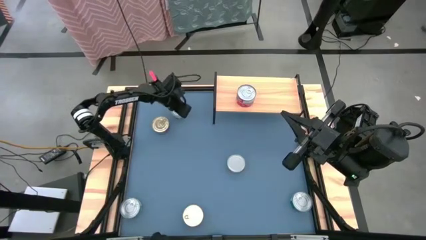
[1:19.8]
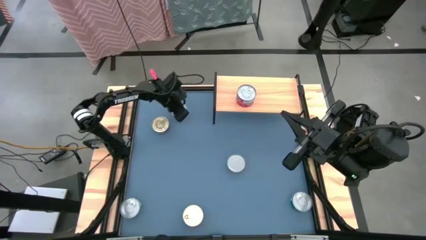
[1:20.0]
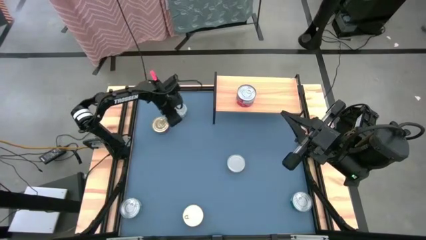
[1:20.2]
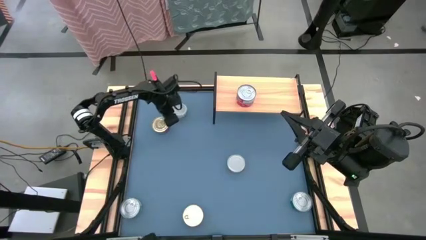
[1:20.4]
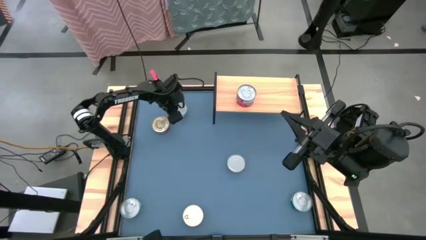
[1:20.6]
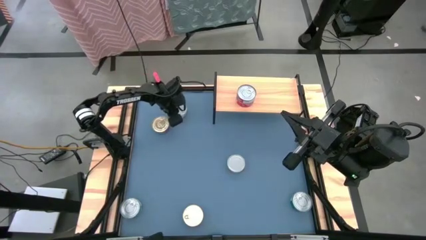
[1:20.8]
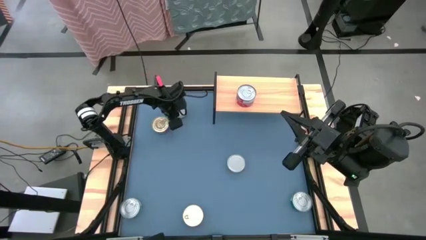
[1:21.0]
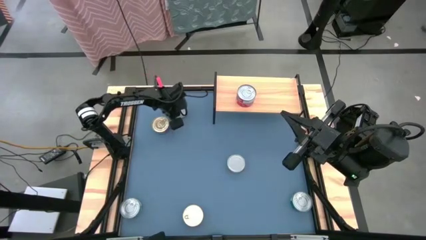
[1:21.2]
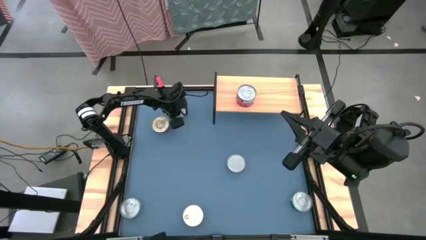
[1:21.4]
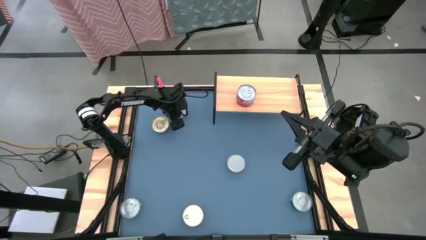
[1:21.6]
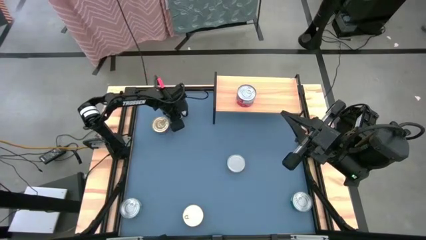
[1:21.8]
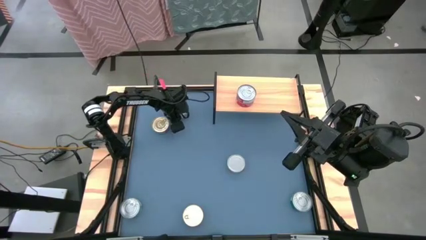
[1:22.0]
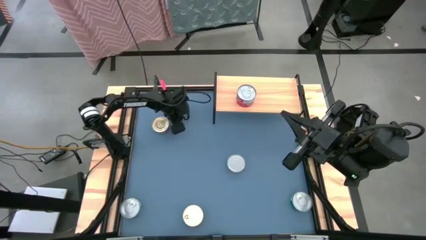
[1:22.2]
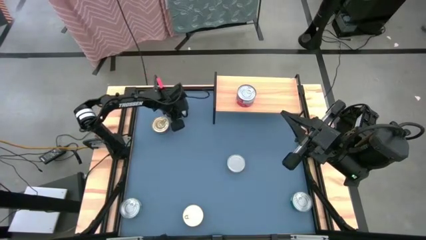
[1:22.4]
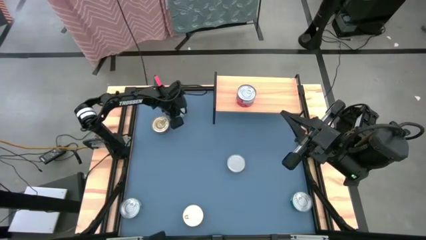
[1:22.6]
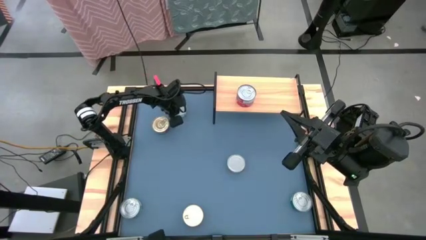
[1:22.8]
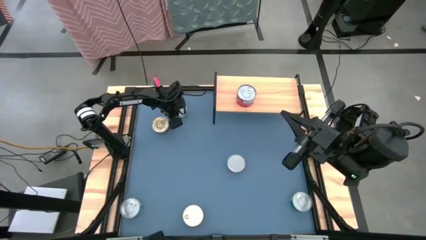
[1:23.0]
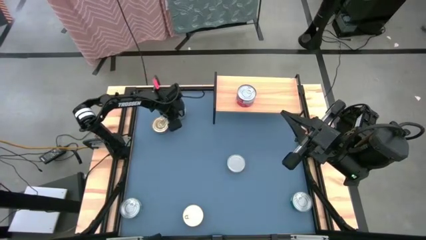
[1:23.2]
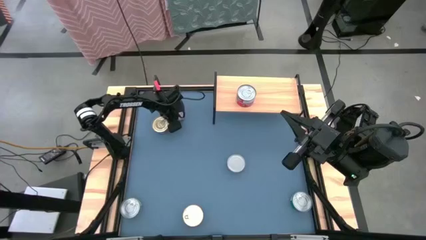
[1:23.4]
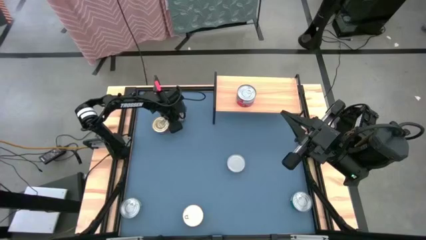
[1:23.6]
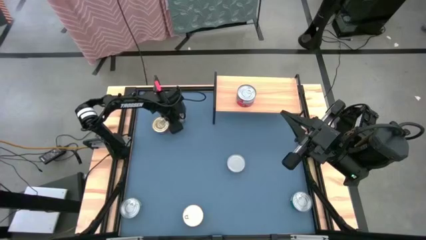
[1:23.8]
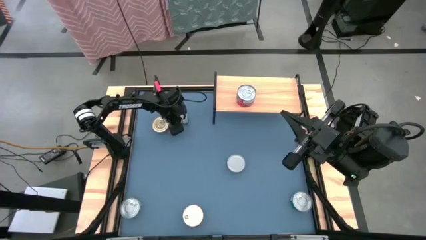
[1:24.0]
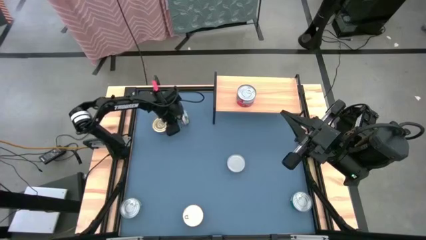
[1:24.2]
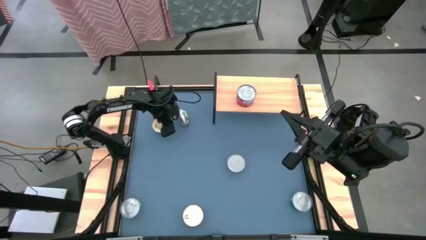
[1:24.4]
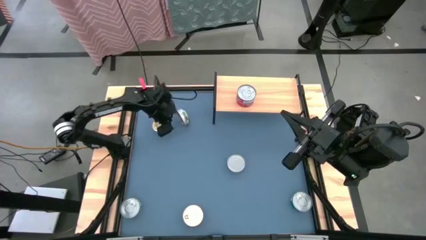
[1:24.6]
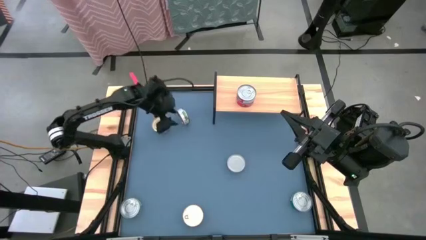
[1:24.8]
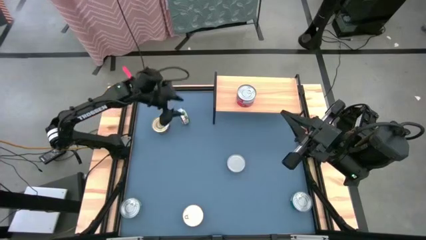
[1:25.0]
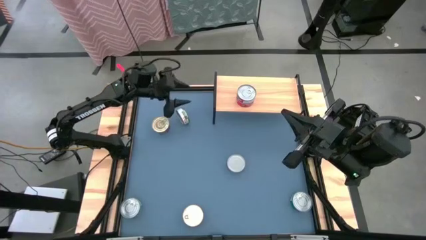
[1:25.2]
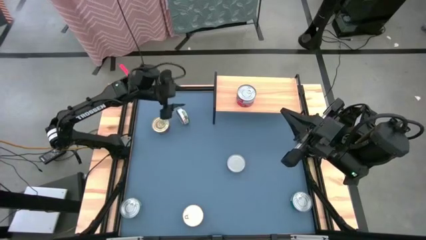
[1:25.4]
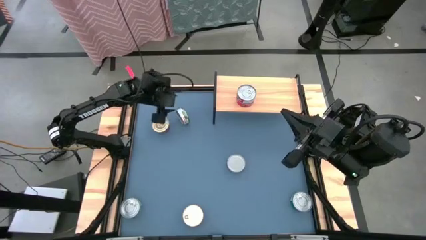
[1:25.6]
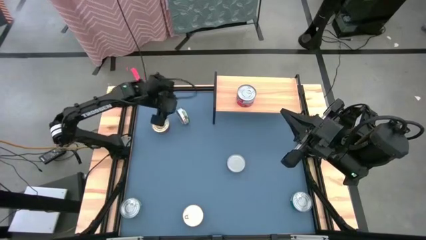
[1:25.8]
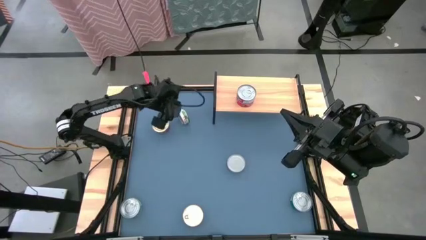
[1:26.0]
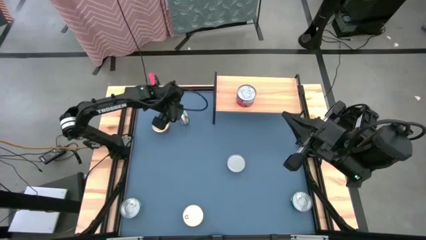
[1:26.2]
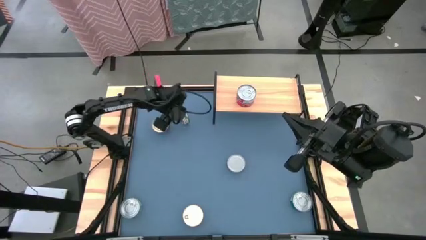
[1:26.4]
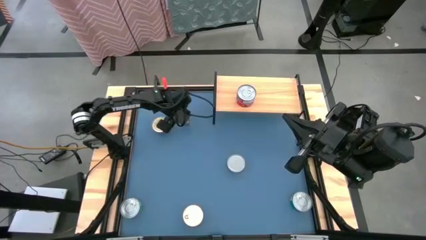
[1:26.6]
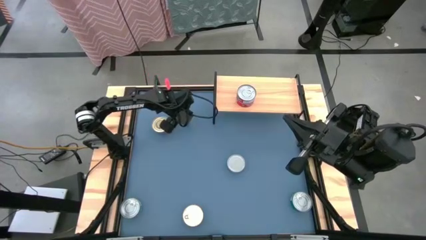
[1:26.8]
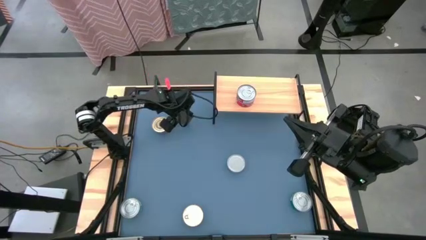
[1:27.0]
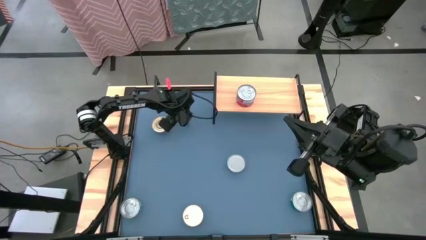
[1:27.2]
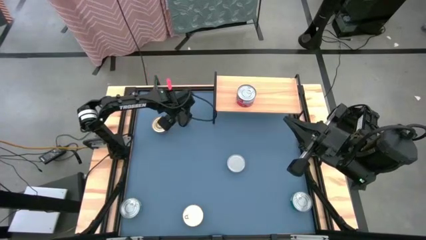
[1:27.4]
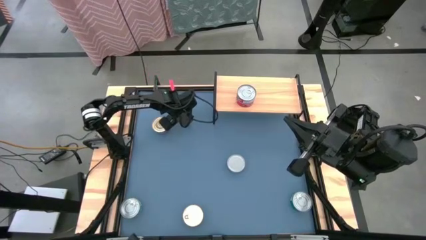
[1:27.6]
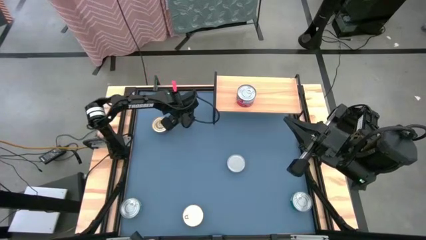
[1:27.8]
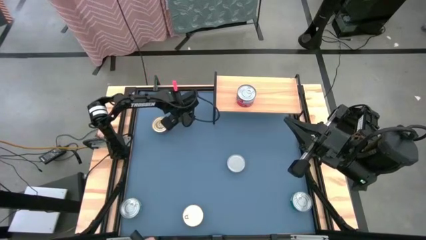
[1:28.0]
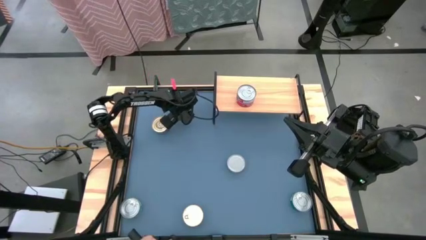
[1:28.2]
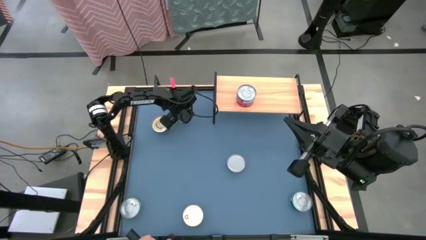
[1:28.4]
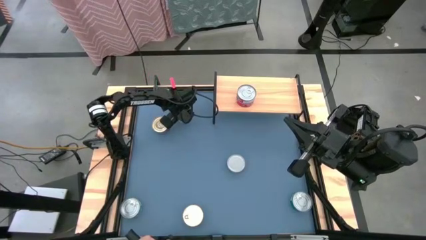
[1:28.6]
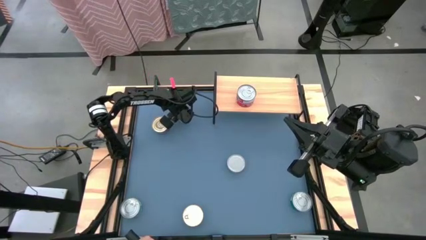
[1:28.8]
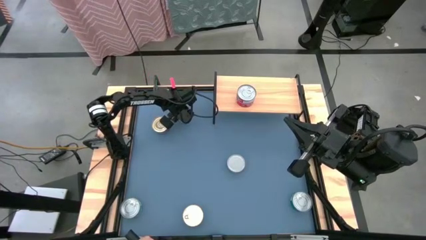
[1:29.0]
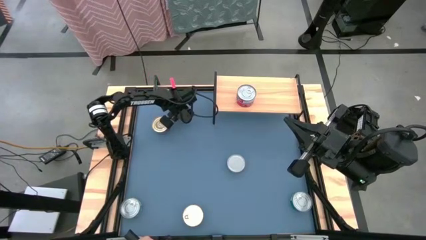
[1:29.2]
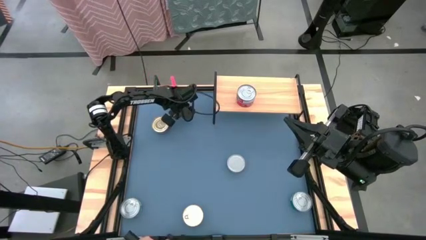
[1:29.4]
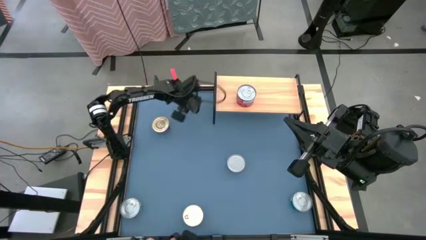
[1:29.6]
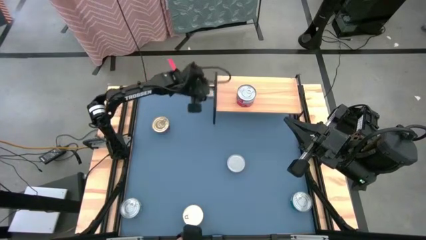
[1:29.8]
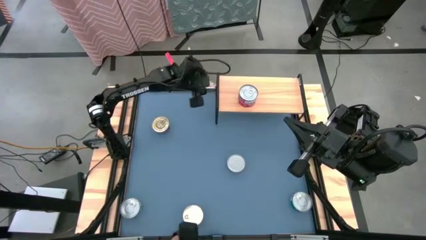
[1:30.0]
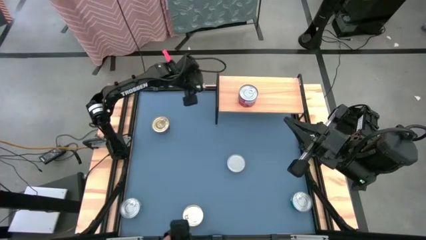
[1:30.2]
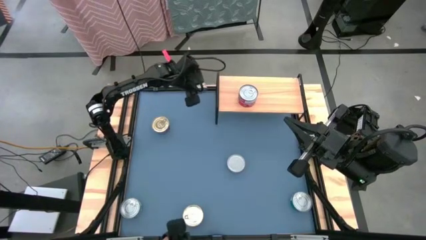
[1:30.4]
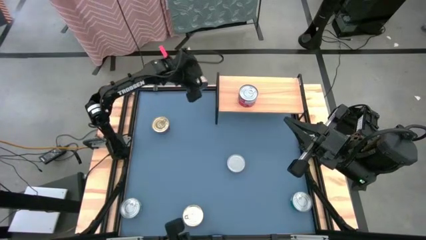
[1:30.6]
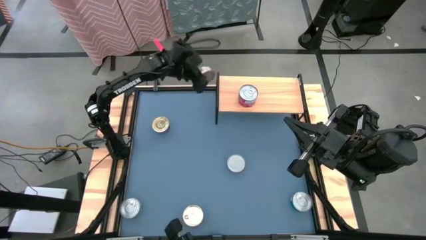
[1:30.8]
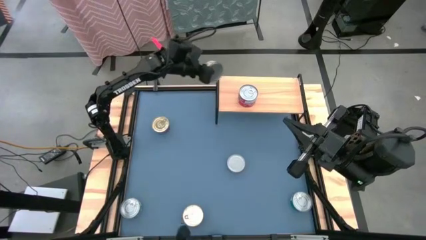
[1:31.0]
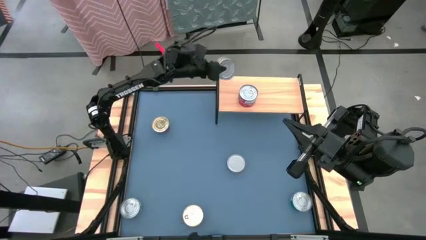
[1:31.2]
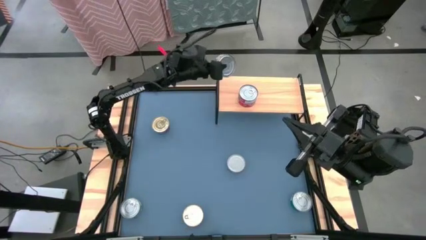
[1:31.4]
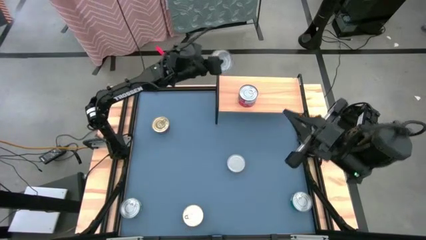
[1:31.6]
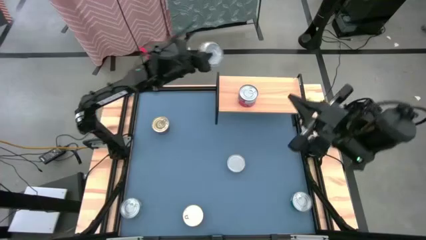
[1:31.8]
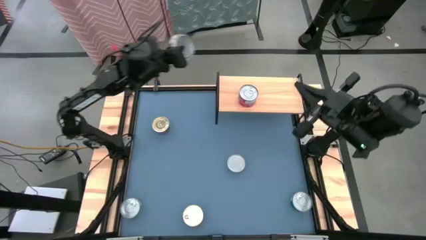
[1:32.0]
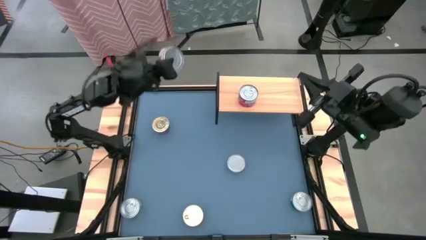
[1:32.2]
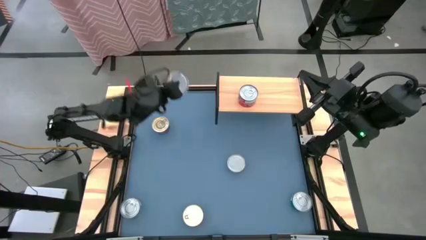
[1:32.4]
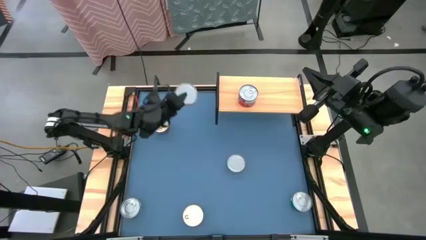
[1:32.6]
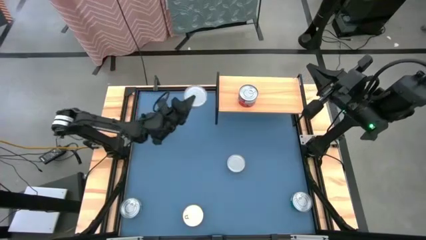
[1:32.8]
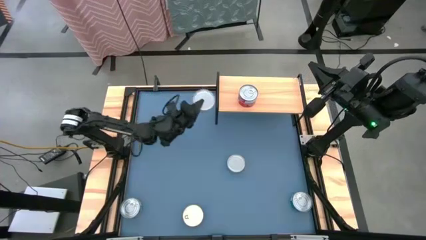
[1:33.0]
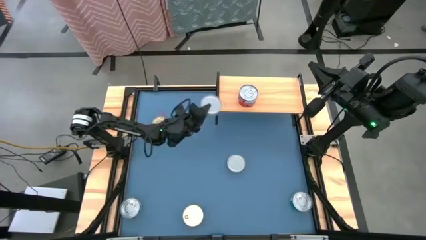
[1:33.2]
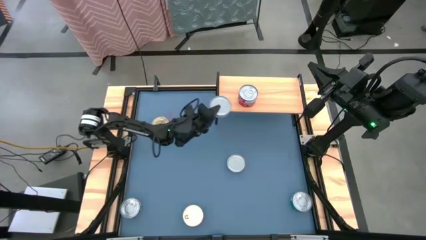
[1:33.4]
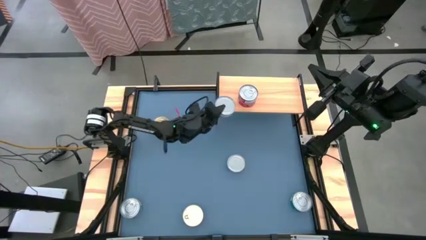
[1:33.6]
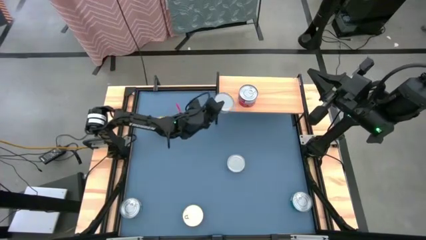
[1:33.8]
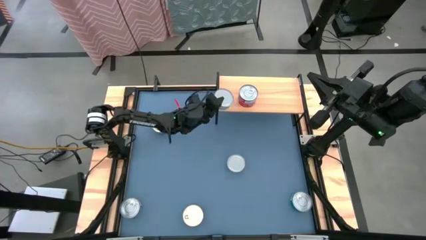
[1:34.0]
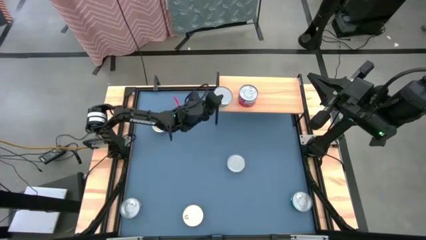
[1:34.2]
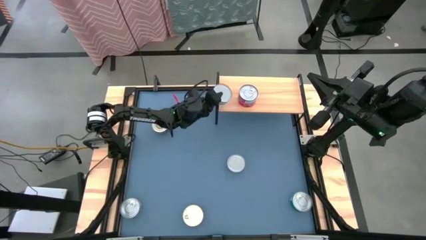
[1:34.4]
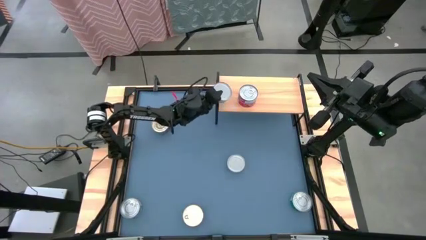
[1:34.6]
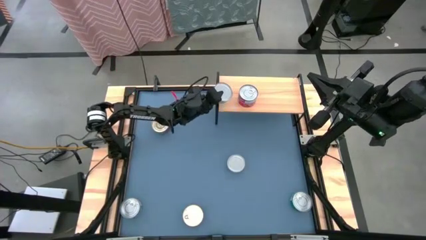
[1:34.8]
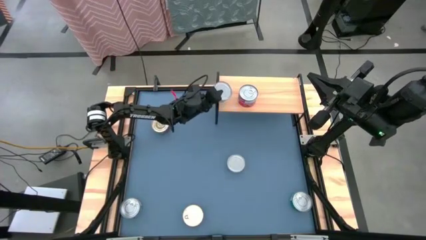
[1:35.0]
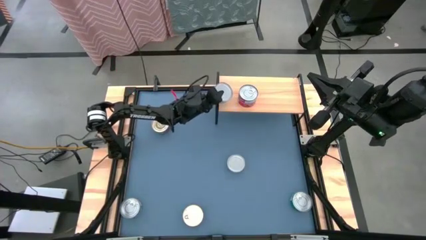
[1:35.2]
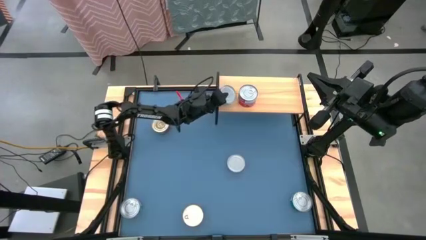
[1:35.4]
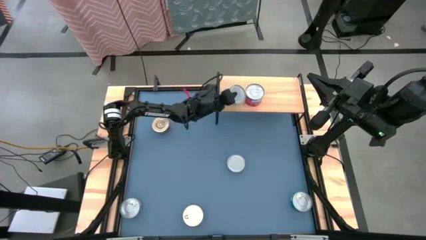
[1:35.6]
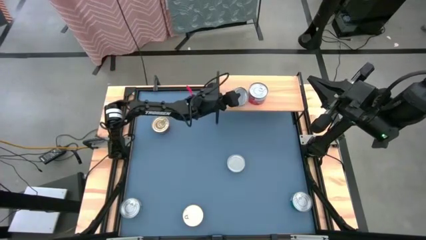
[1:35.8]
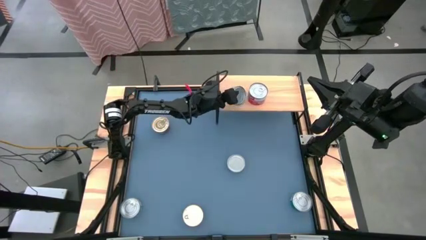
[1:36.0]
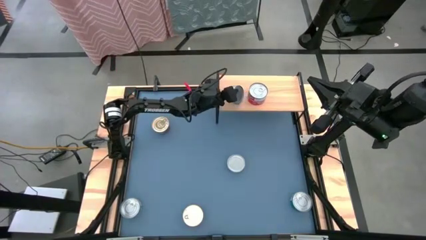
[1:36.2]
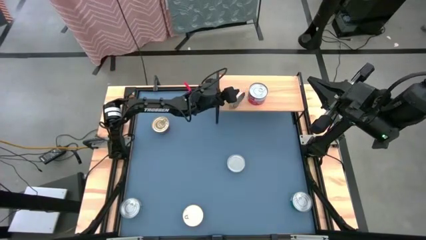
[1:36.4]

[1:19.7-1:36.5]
Task: Stack canned seafood by type on shelf
Put the top green tuna can on the shelf
